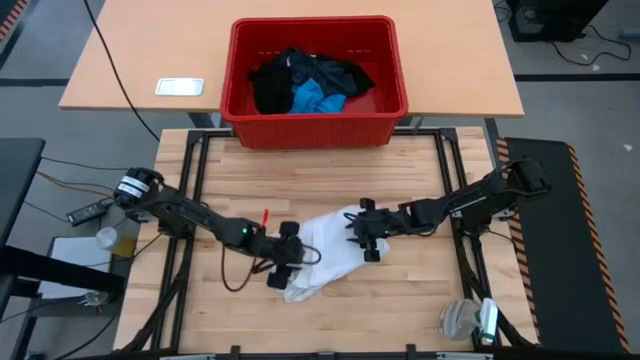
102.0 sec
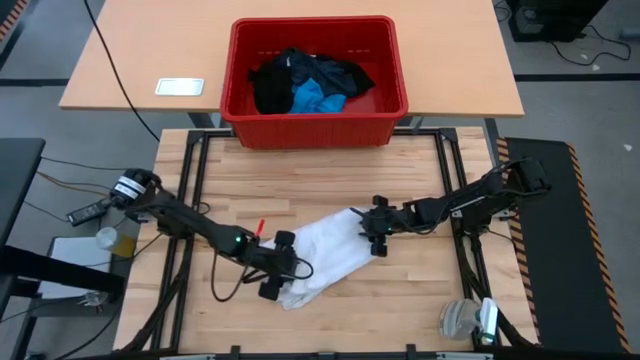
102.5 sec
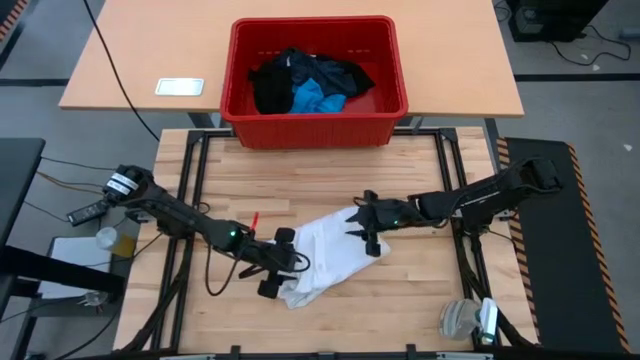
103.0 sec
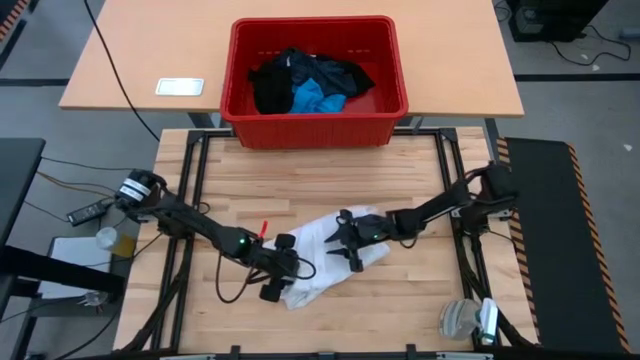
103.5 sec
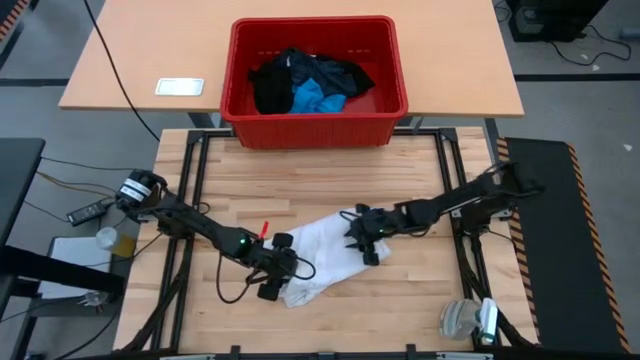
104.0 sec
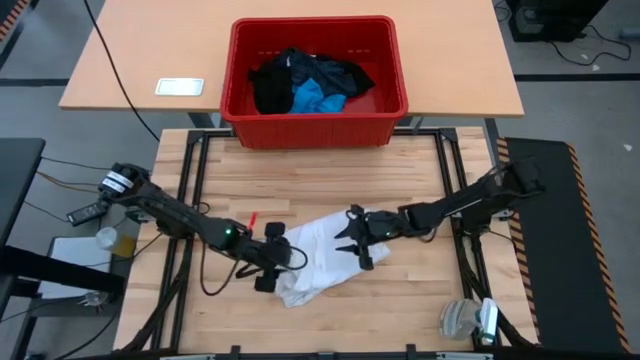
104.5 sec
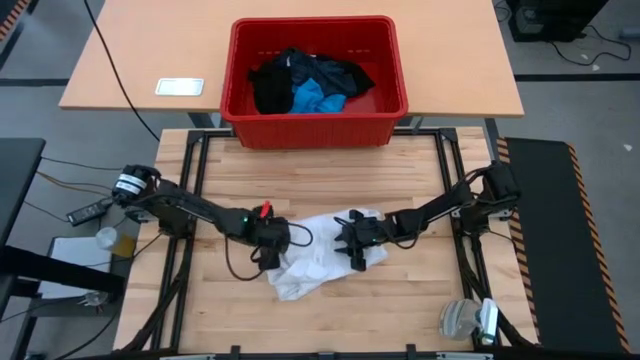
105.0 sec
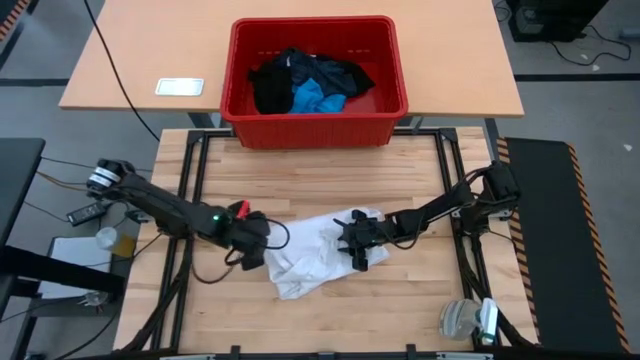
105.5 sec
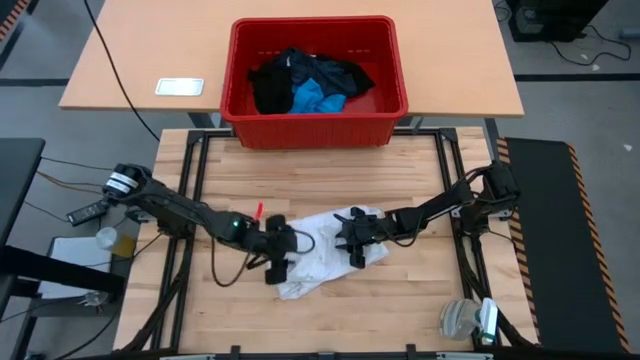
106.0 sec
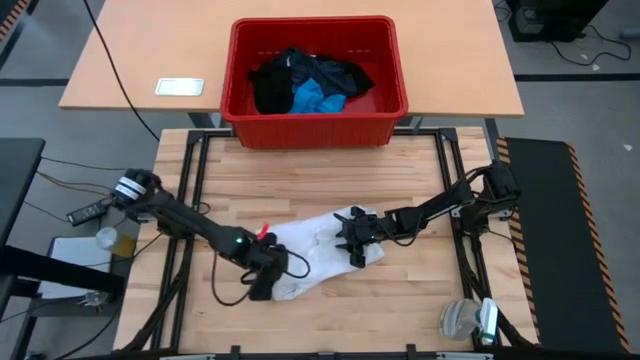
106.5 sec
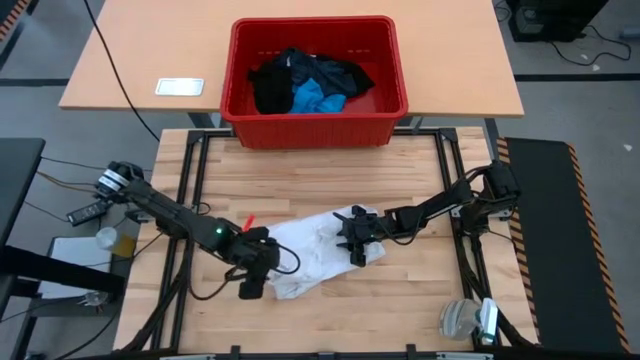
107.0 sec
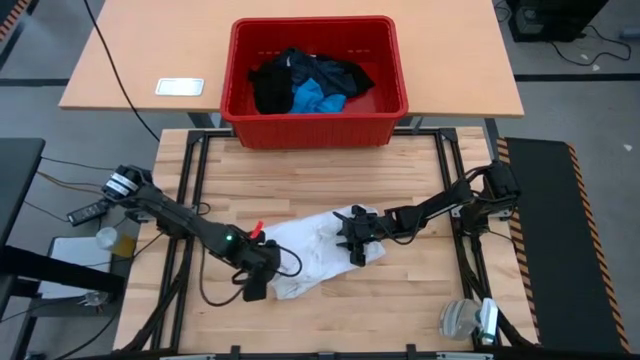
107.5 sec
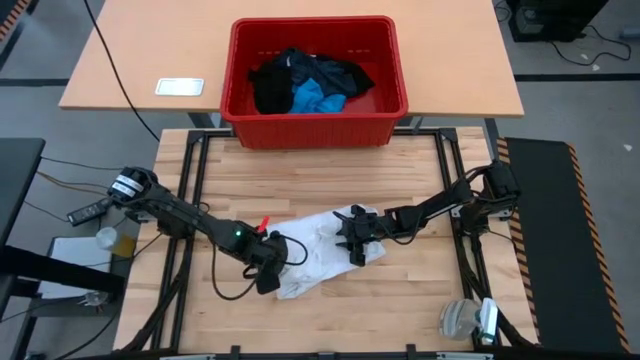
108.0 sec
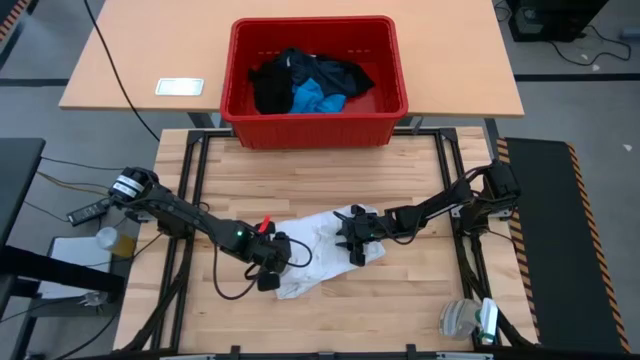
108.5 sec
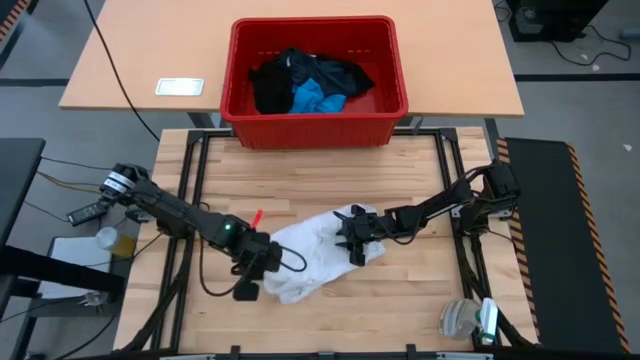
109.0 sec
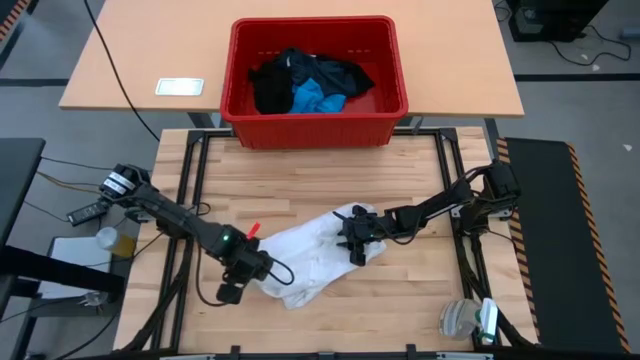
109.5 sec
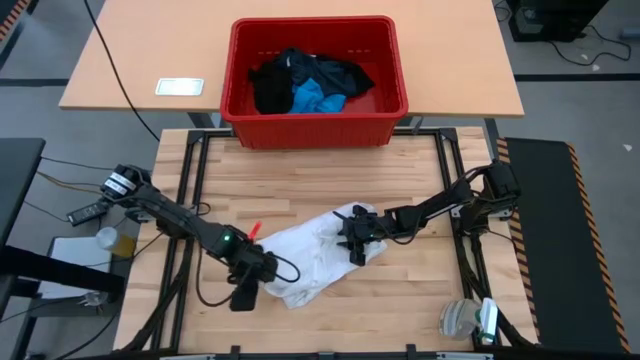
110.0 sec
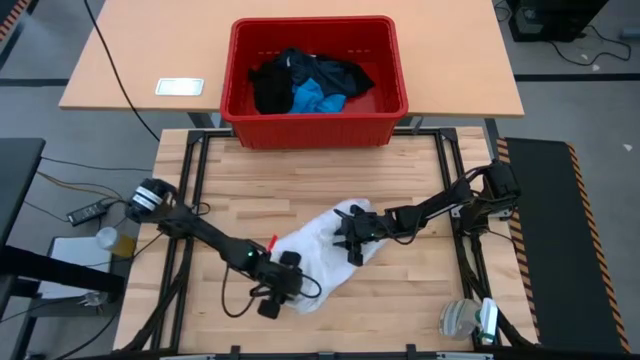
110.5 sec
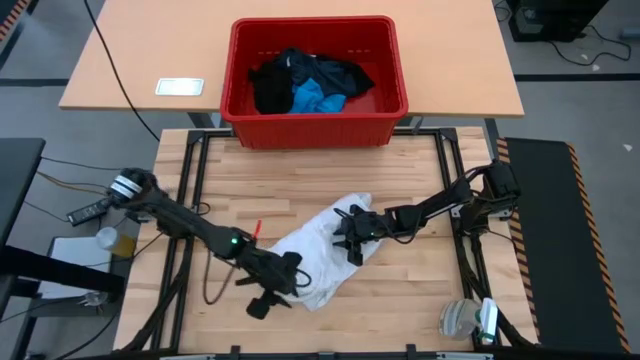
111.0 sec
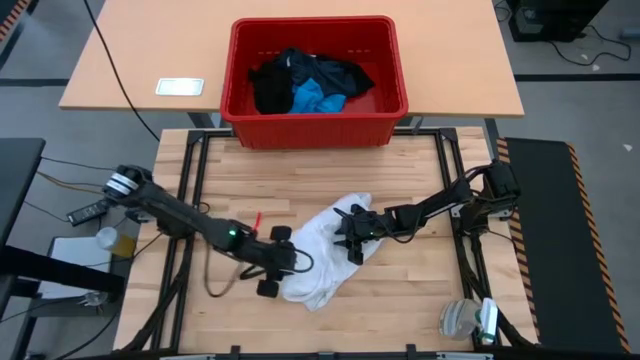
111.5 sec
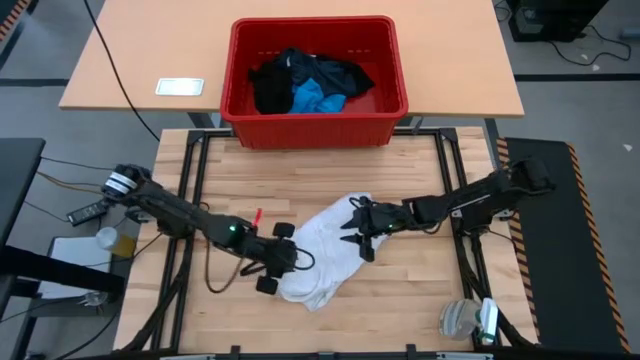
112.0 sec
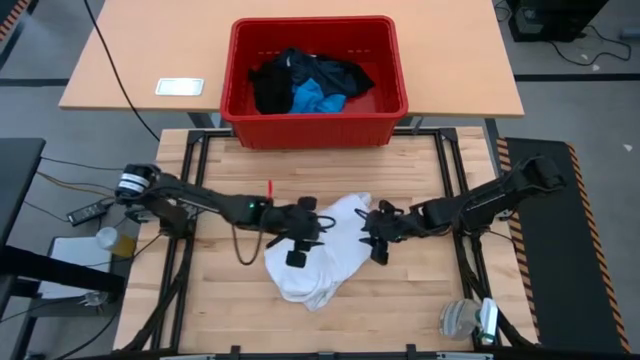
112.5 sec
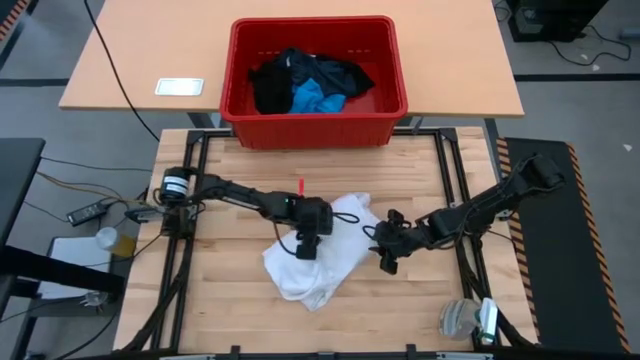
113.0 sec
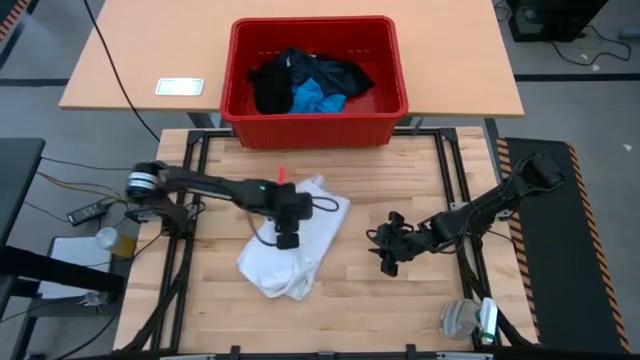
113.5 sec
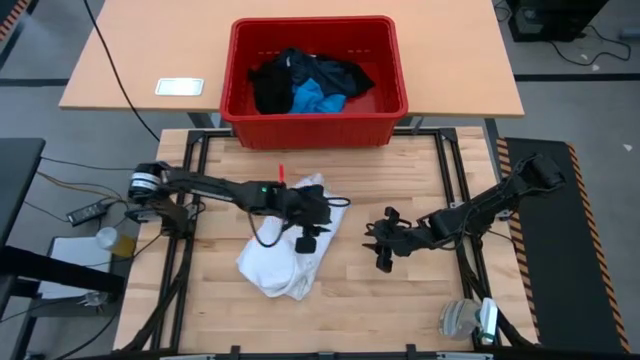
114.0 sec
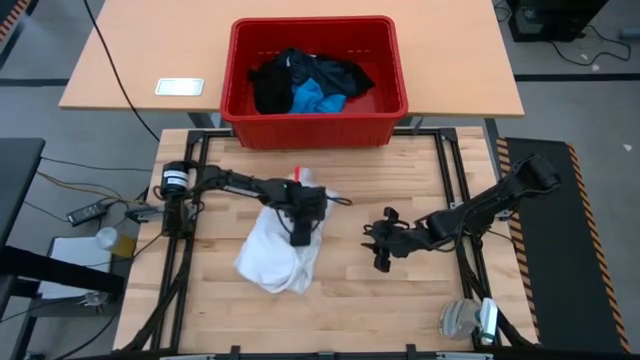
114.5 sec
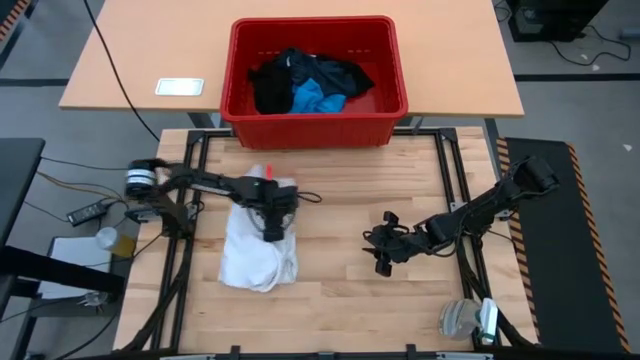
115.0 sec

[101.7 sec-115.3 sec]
Task: Fold laundry
Fold the white polo

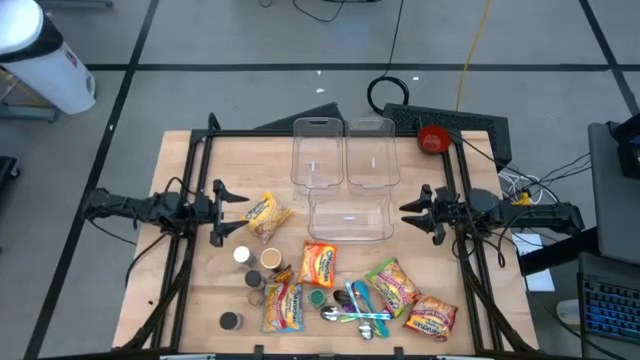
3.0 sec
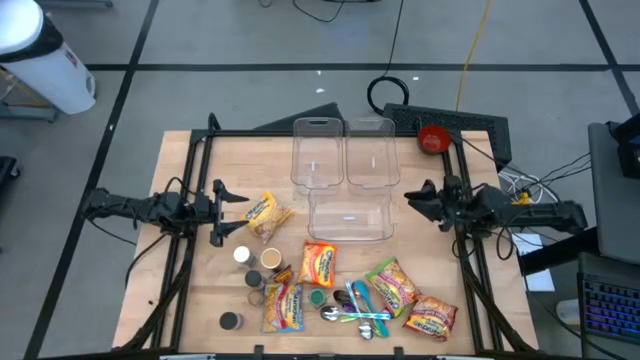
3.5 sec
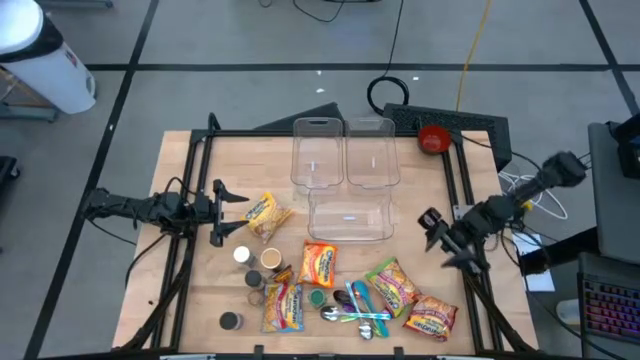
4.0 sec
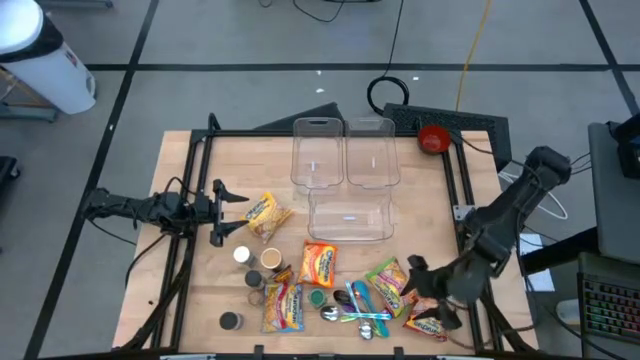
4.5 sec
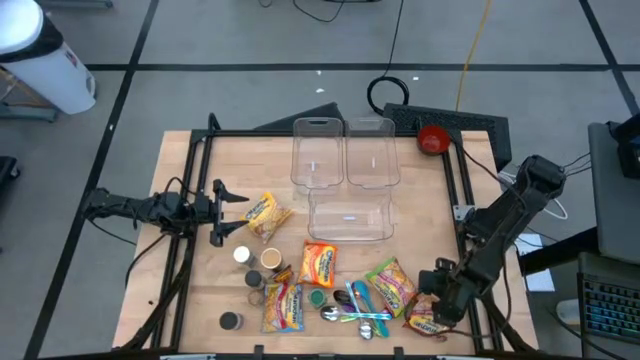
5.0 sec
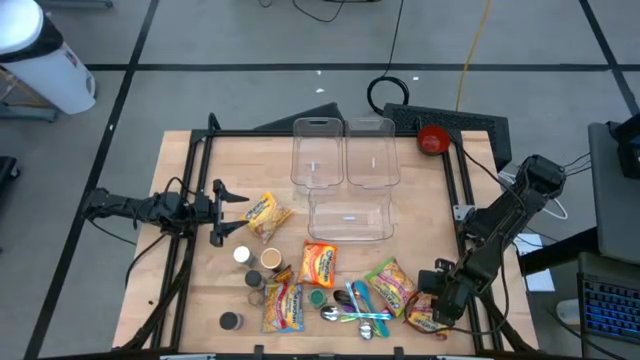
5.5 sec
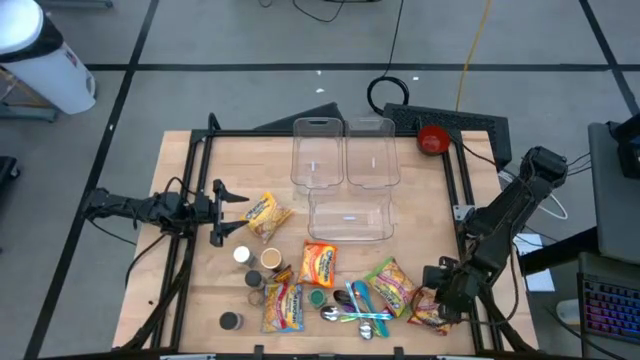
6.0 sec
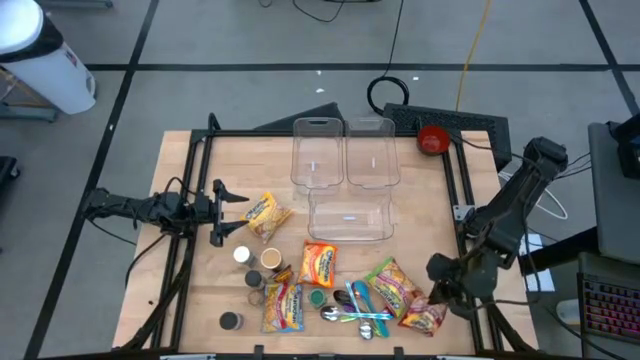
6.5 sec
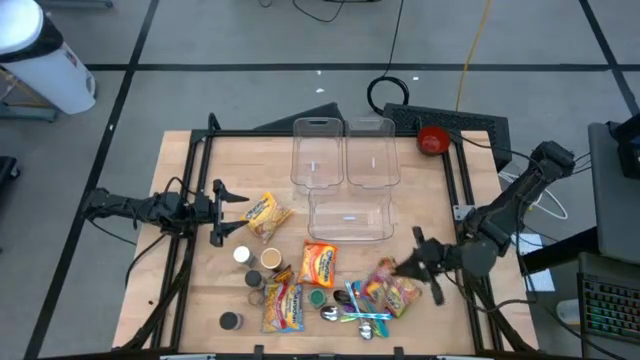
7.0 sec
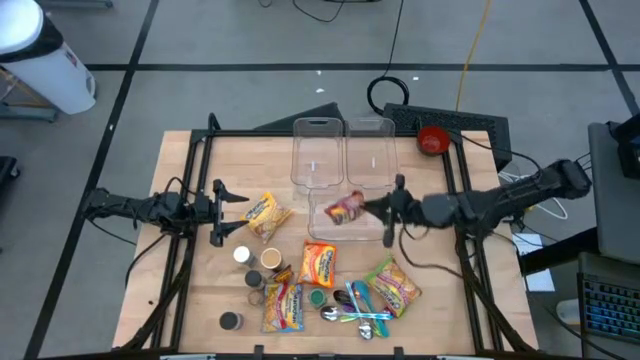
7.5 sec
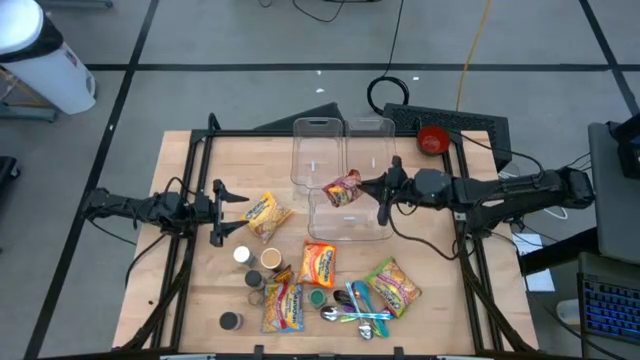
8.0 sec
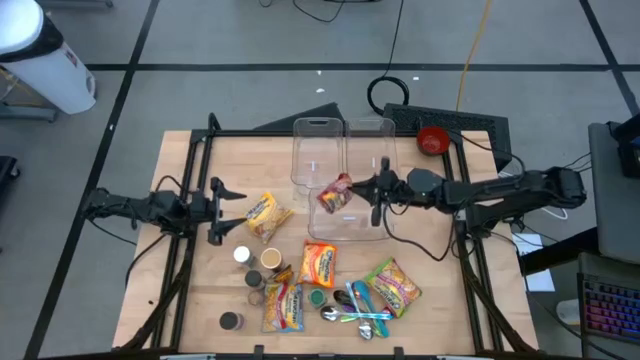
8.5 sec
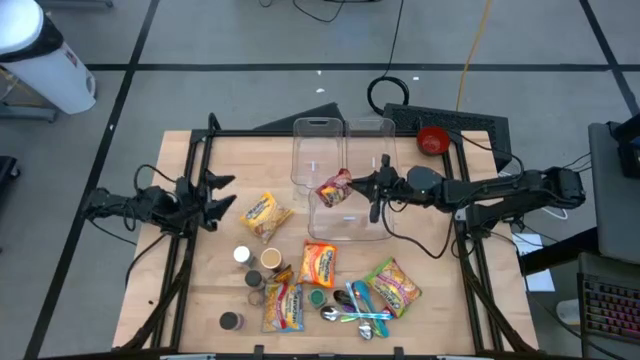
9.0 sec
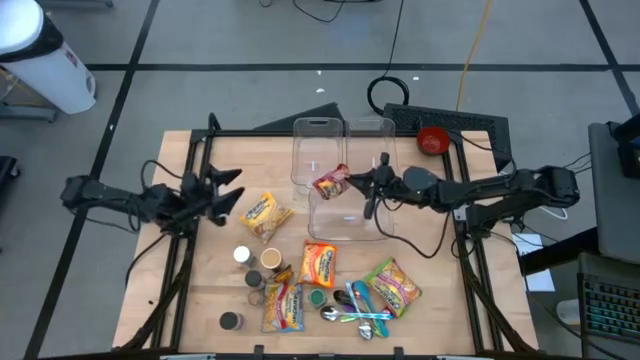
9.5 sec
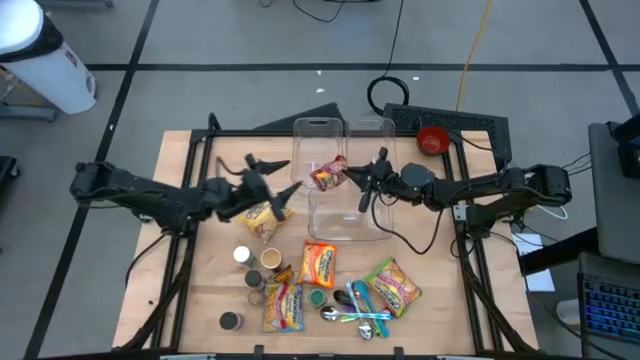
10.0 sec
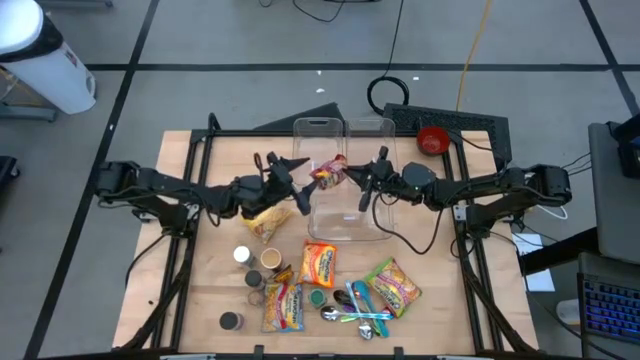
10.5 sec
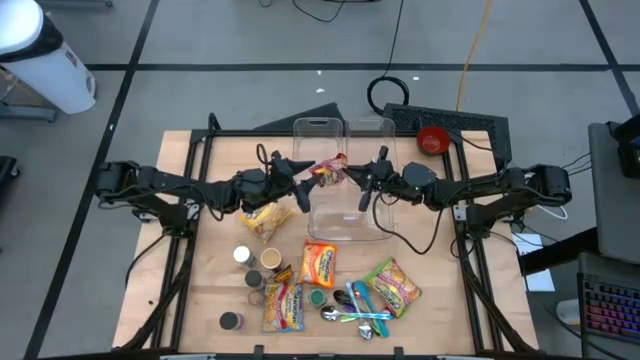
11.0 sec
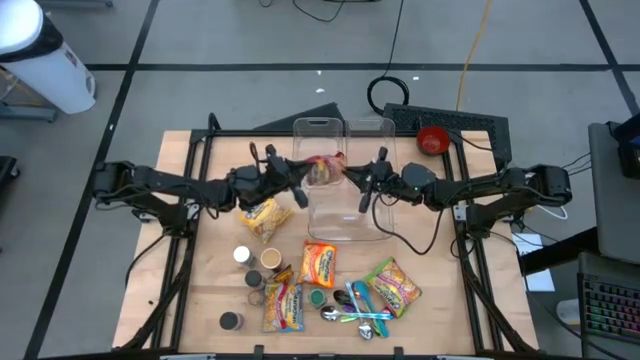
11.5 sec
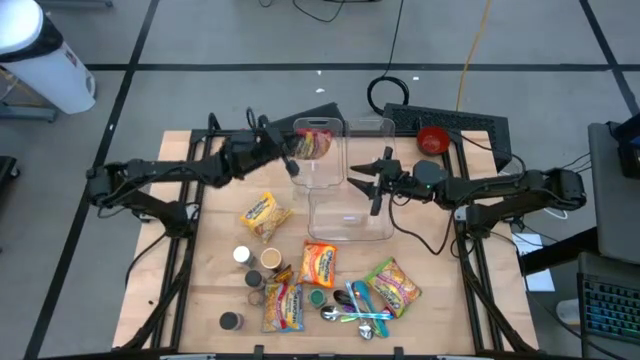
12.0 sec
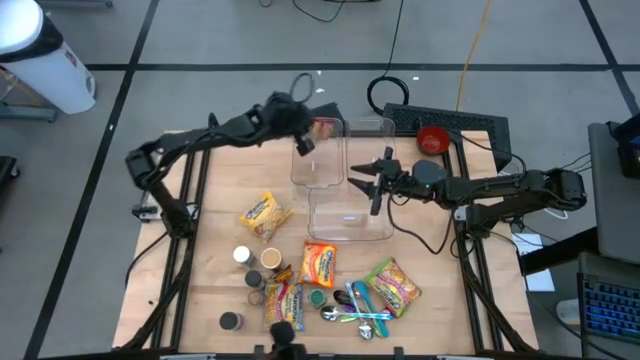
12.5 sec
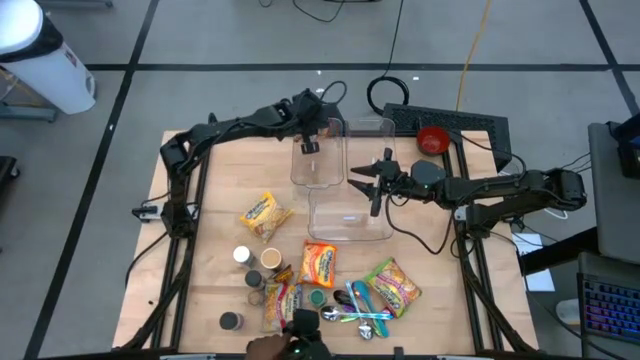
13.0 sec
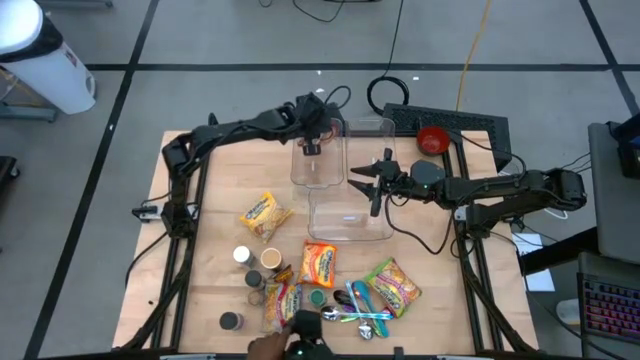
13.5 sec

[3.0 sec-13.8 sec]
Task: Pick & Place Food Item
Put the red noodle pack into the left transparent bin
